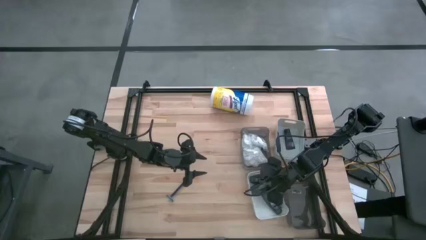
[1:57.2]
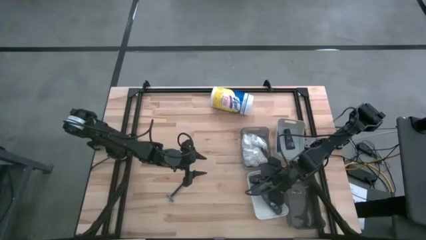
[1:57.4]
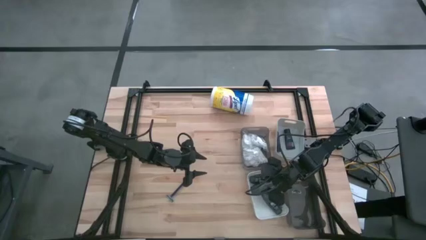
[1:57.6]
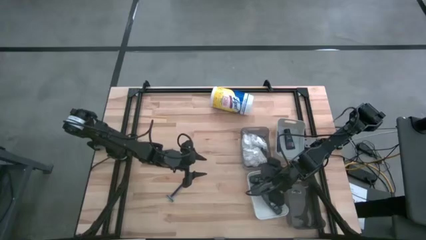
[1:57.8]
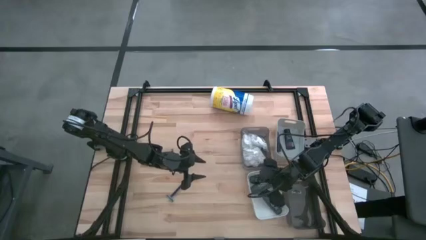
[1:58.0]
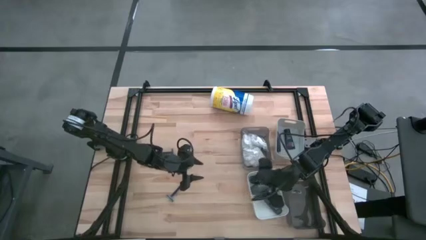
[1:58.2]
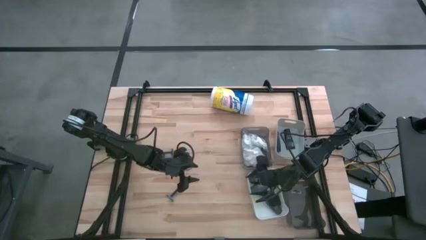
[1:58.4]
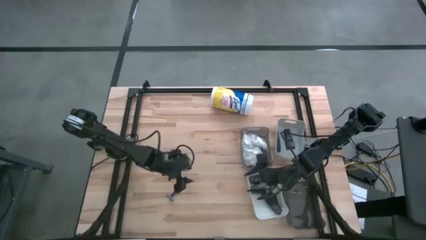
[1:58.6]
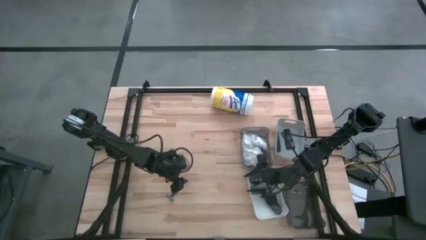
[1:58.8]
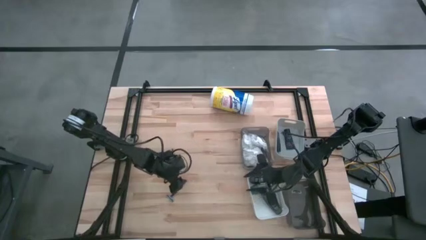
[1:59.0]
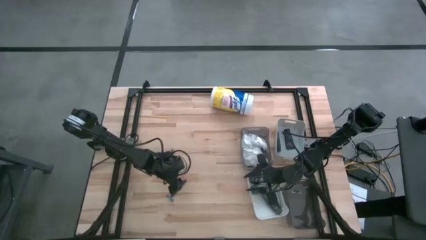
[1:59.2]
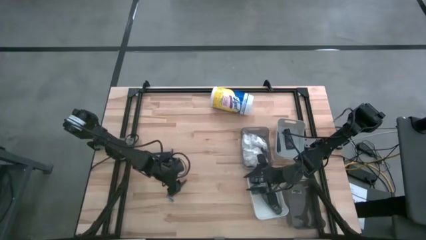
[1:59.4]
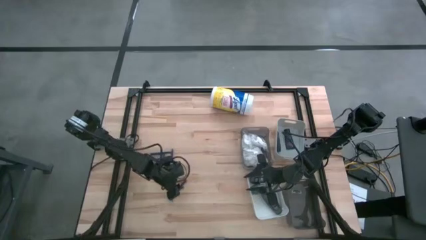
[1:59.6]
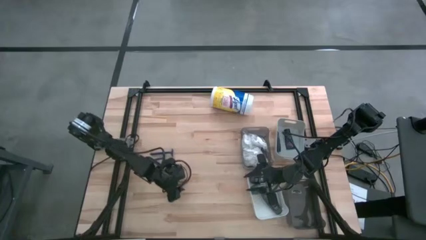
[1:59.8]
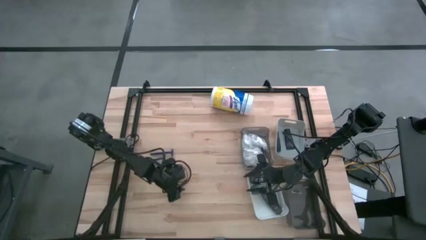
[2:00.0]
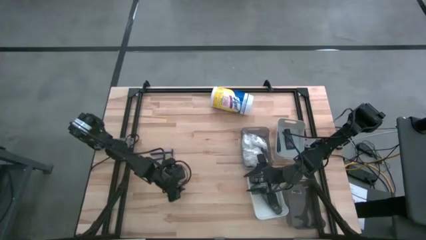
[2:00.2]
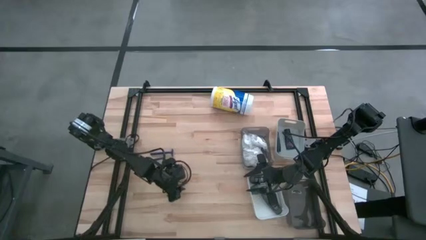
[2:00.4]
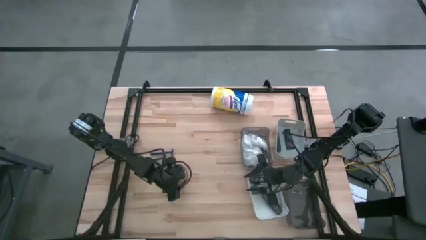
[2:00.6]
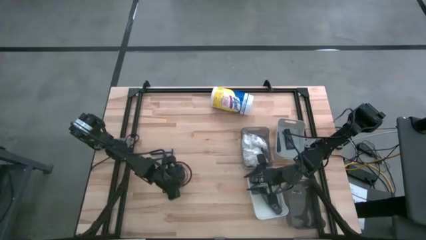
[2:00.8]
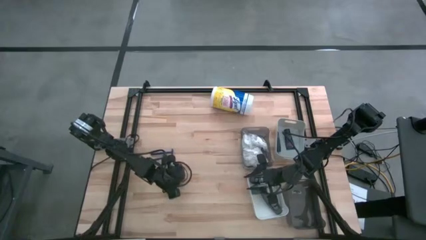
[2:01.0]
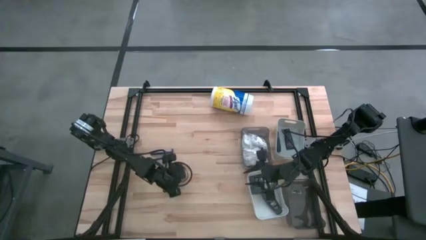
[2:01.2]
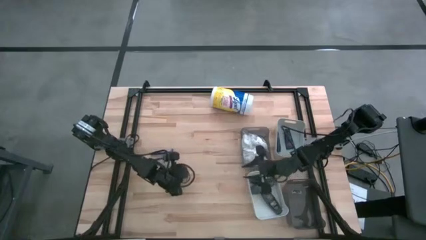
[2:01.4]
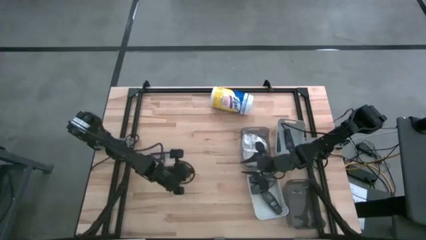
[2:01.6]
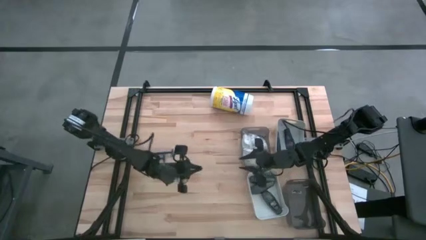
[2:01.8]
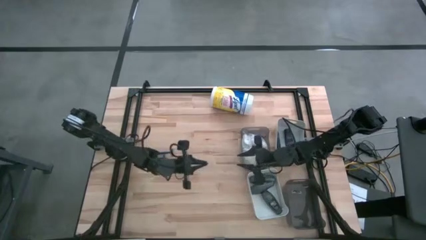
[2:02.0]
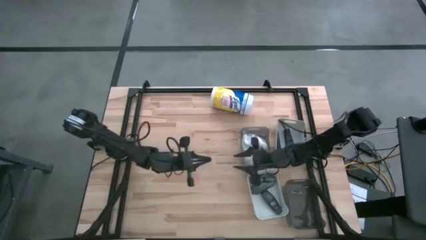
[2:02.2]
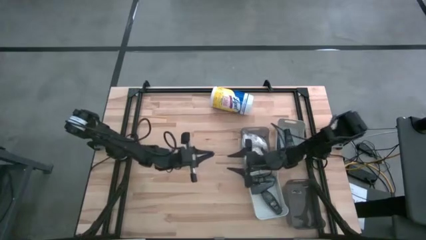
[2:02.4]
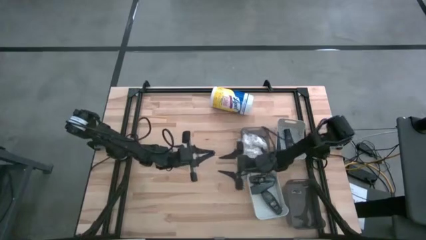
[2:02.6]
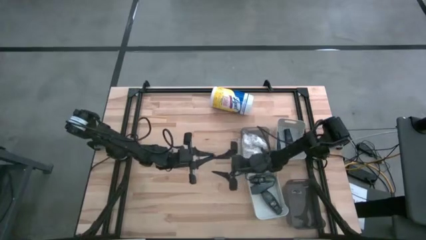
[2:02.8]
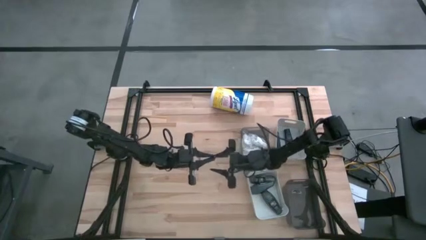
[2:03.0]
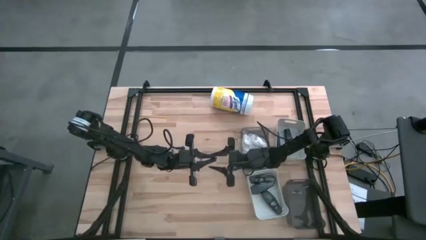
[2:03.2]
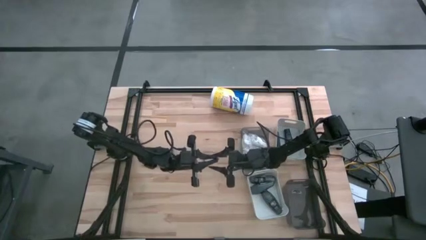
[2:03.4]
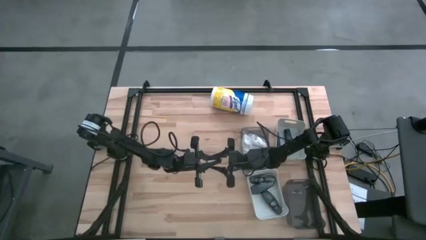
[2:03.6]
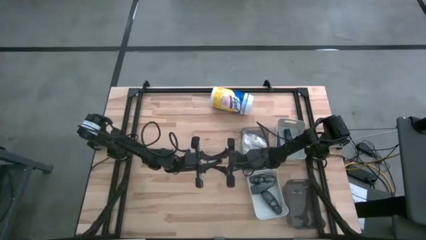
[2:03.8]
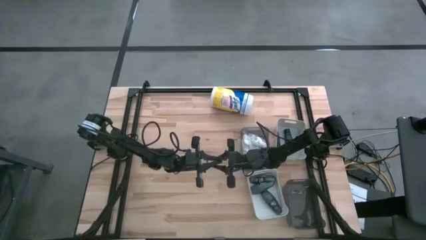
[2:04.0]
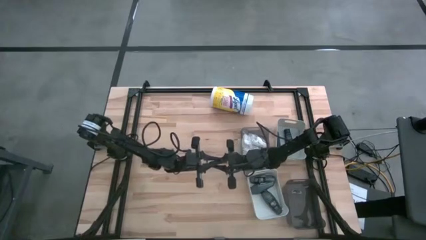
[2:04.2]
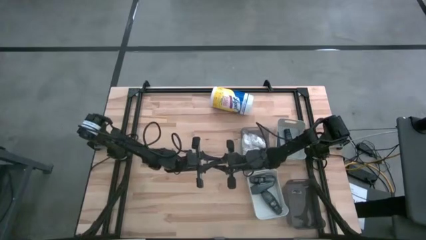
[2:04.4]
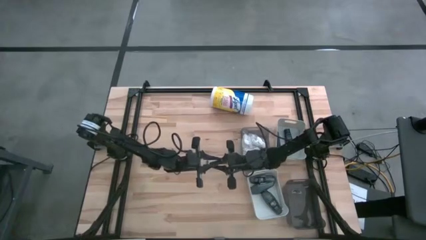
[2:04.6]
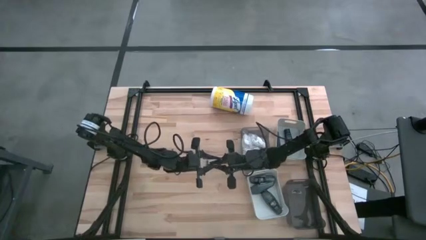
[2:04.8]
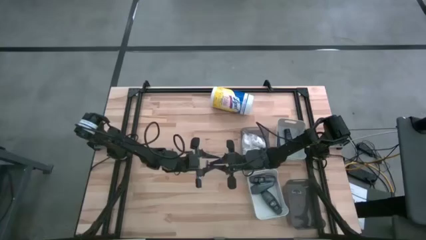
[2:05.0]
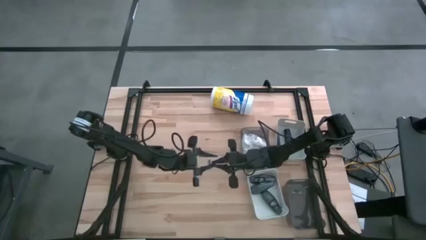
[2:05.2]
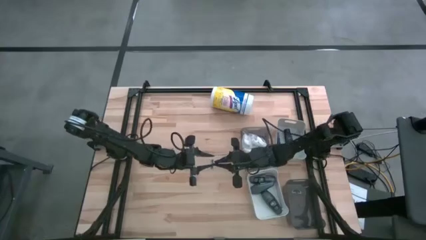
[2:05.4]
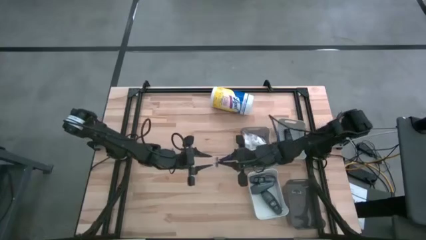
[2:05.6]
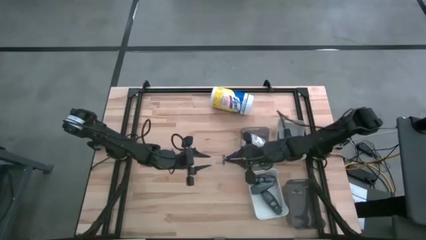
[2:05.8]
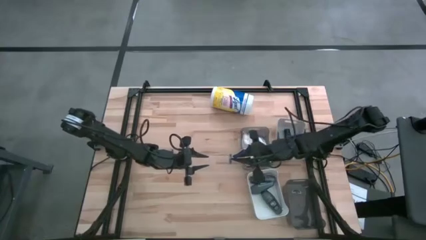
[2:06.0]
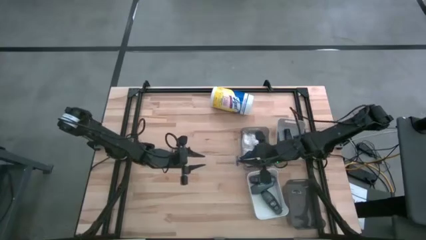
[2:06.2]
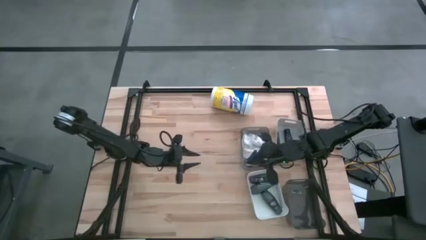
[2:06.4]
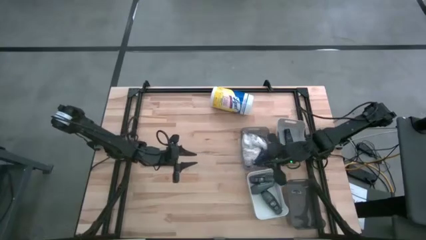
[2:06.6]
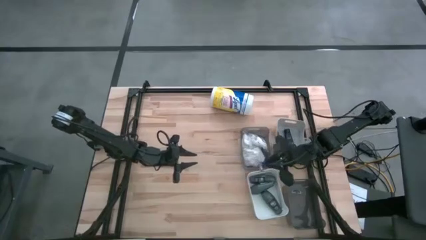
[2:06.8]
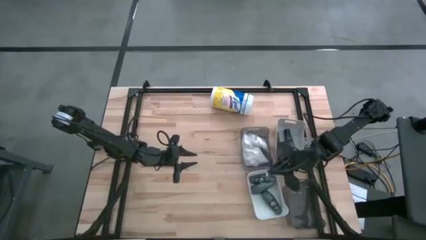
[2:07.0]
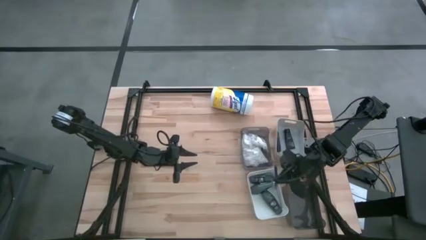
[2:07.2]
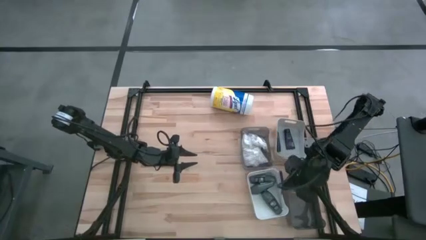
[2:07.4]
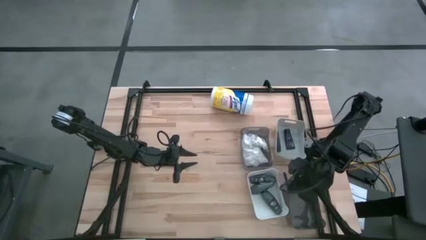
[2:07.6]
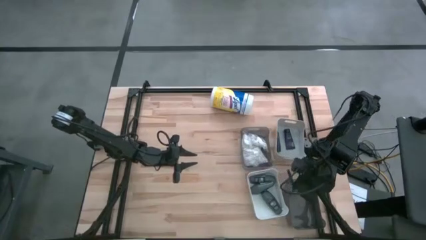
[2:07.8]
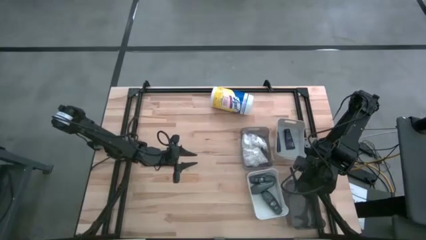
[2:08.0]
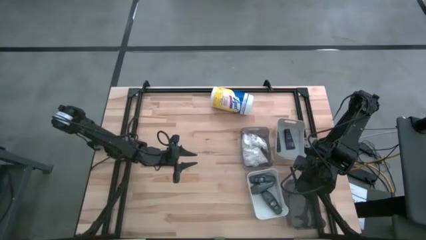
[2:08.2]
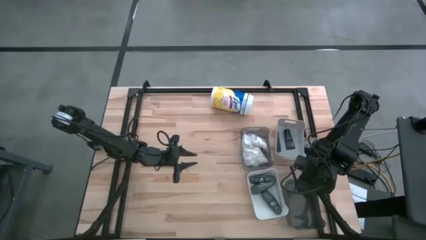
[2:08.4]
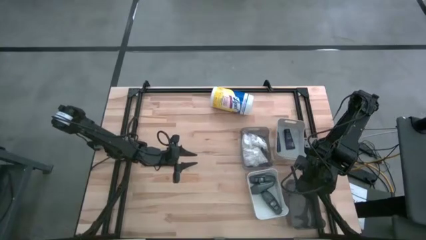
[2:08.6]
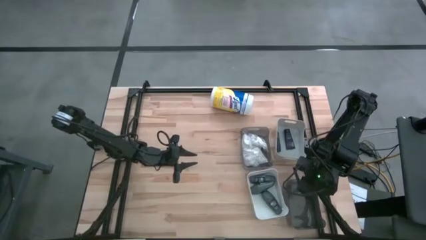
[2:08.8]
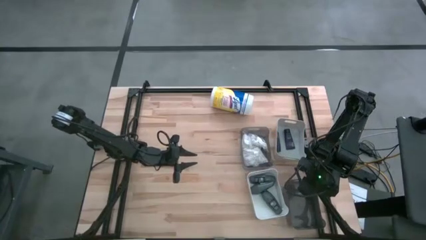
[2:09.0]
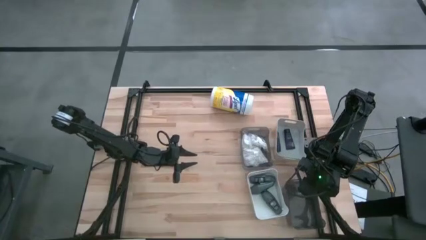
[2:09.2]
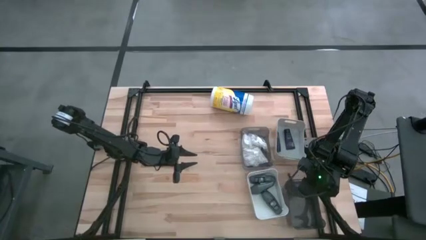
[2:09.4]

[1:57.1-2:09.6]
Task: Pick & Place Travel size toiletries
Put the bottom razor into the bottom black bin
